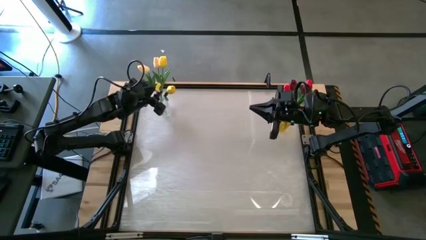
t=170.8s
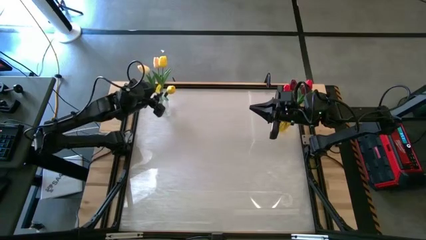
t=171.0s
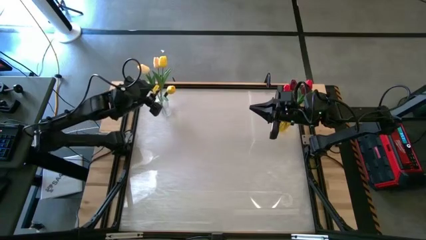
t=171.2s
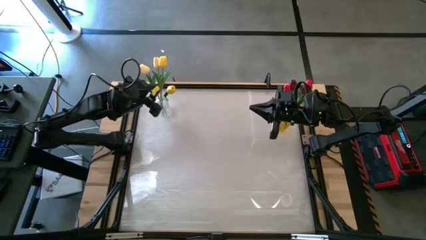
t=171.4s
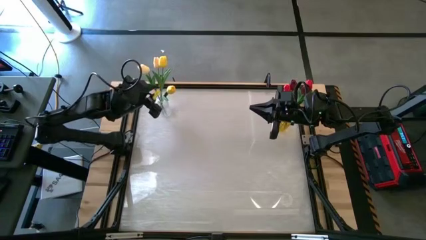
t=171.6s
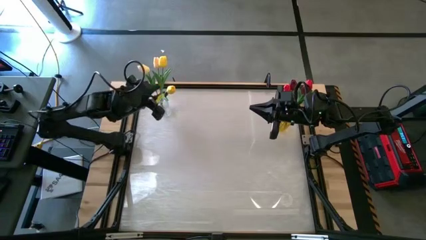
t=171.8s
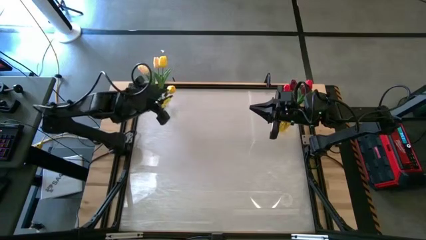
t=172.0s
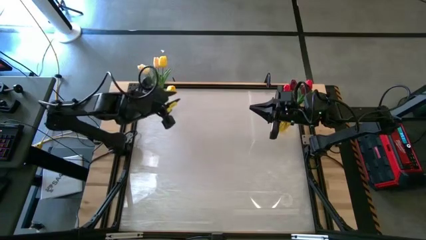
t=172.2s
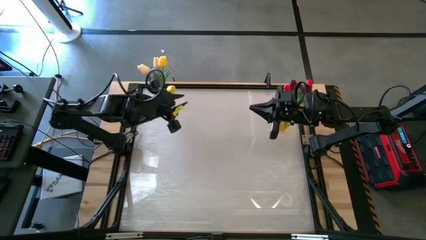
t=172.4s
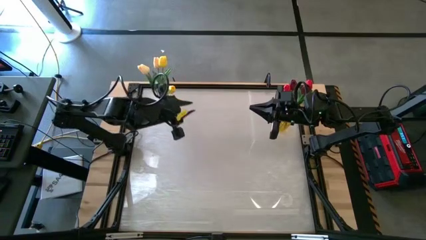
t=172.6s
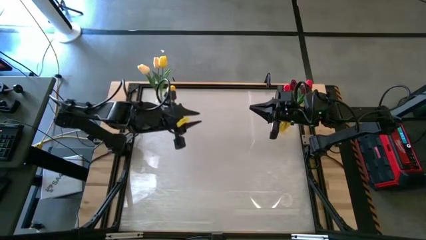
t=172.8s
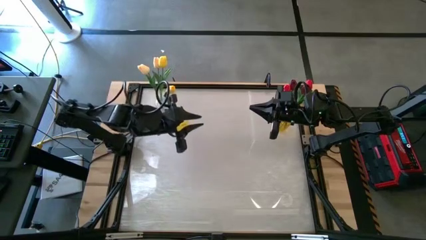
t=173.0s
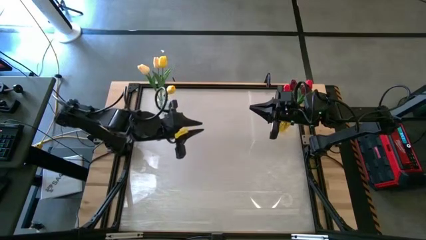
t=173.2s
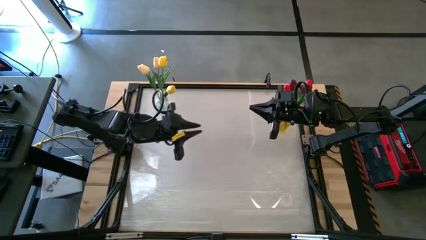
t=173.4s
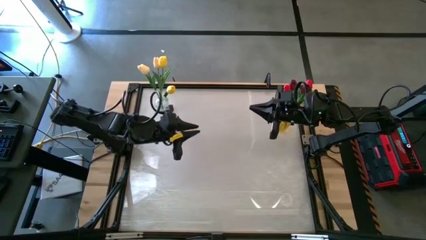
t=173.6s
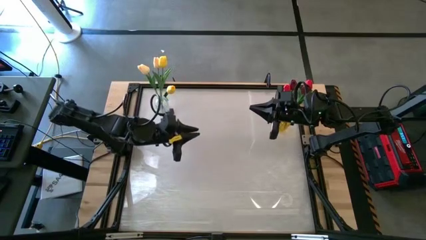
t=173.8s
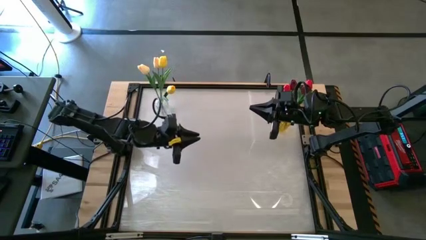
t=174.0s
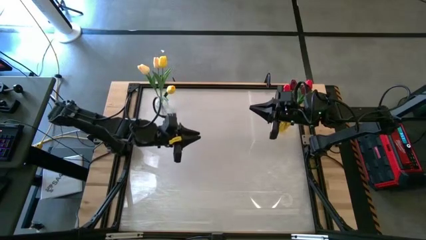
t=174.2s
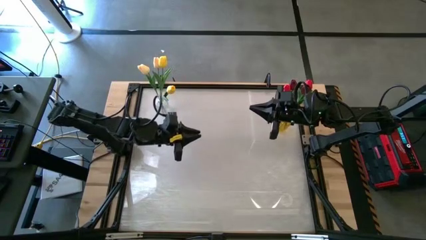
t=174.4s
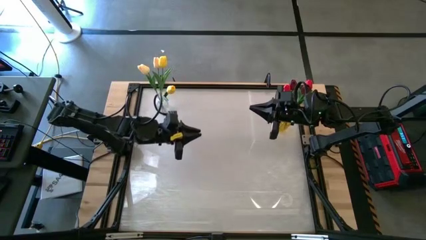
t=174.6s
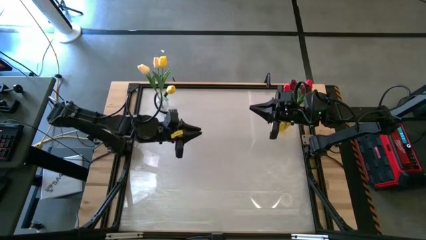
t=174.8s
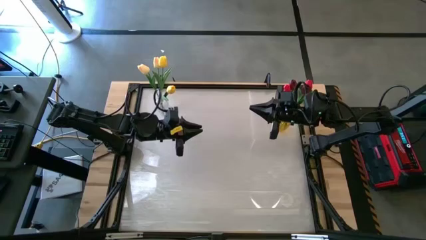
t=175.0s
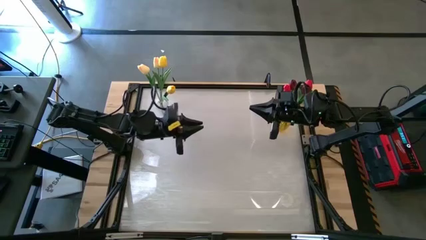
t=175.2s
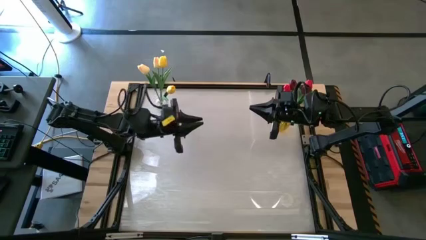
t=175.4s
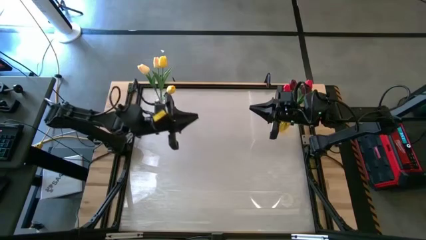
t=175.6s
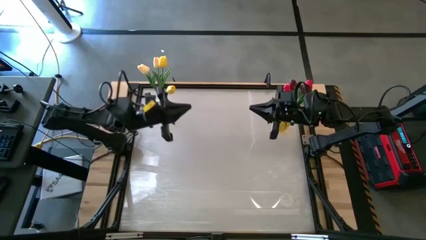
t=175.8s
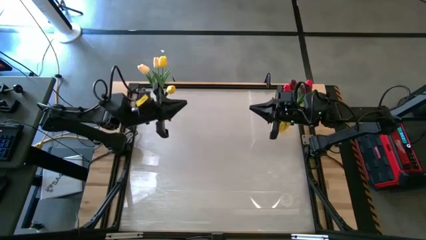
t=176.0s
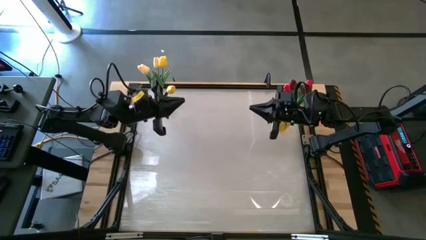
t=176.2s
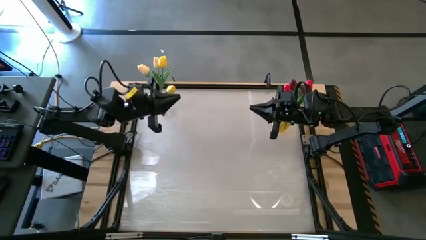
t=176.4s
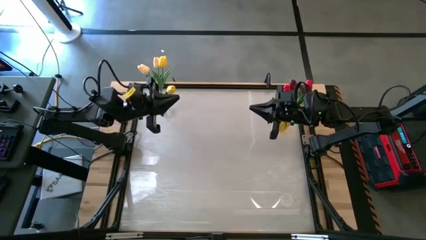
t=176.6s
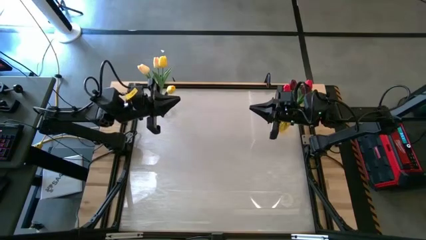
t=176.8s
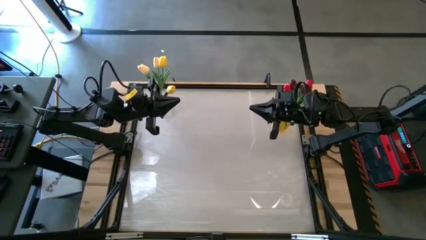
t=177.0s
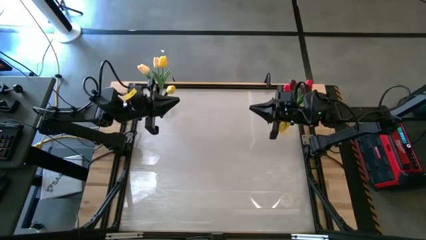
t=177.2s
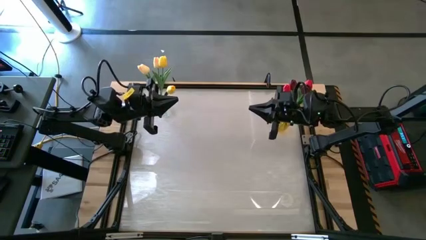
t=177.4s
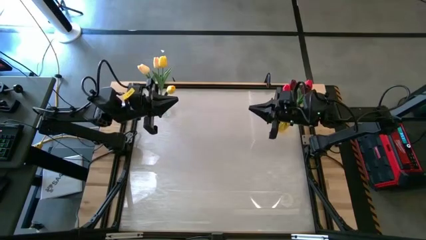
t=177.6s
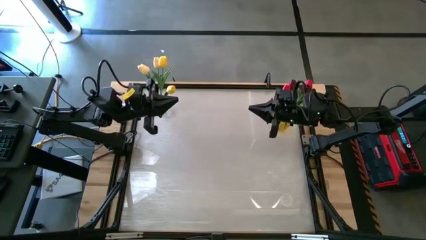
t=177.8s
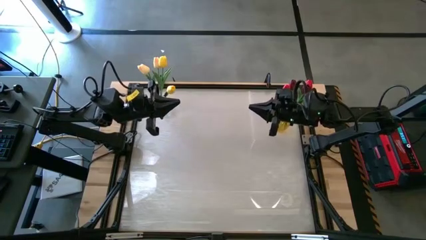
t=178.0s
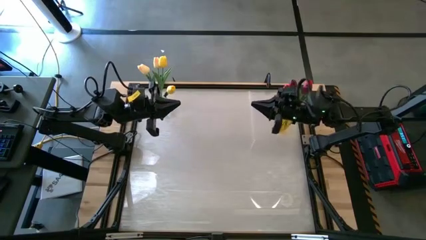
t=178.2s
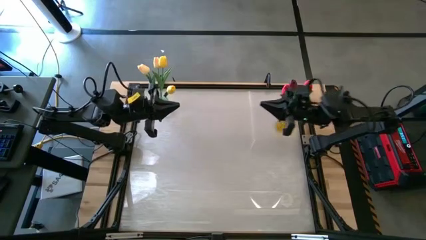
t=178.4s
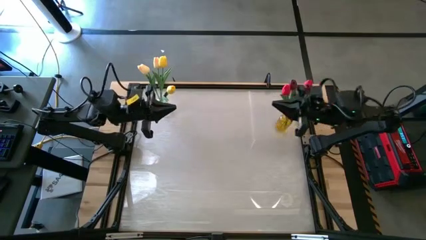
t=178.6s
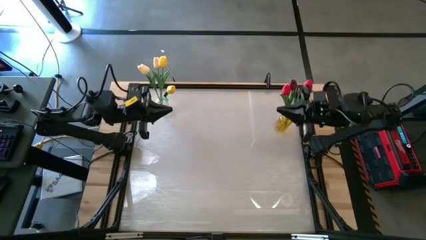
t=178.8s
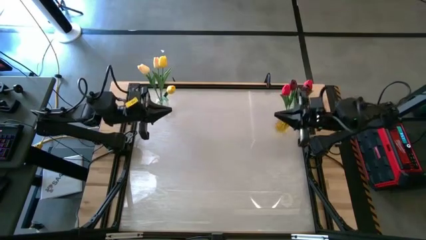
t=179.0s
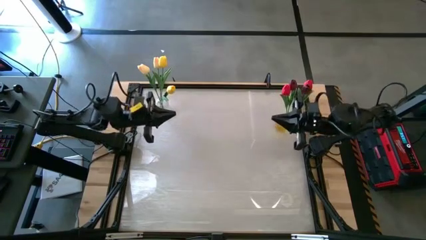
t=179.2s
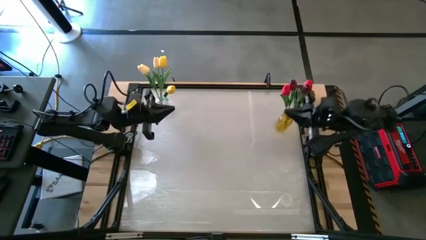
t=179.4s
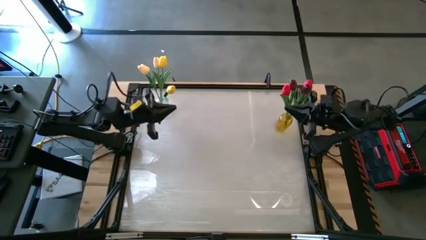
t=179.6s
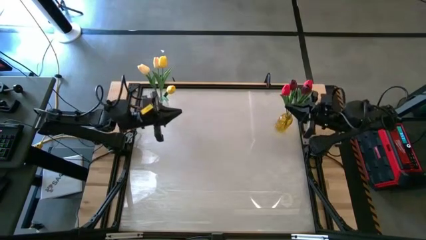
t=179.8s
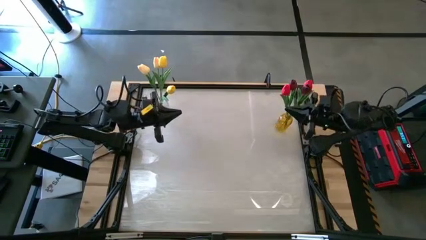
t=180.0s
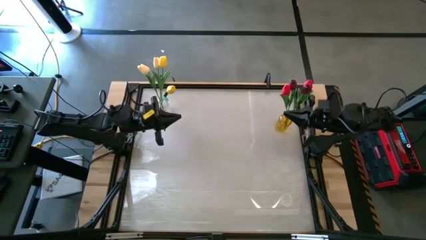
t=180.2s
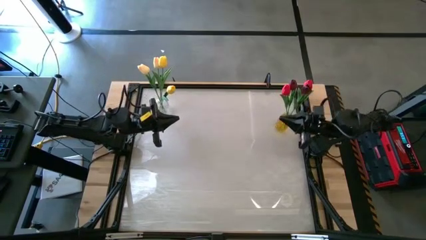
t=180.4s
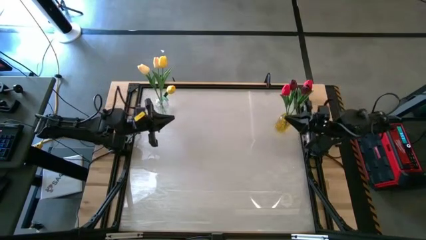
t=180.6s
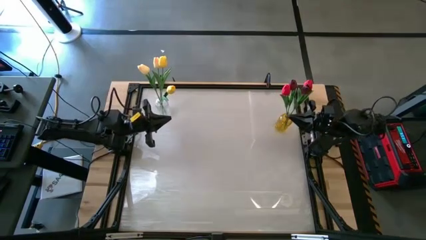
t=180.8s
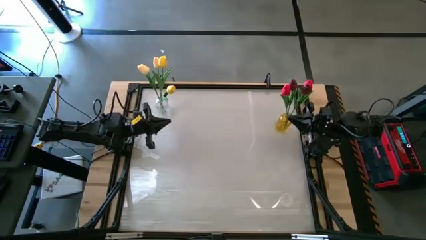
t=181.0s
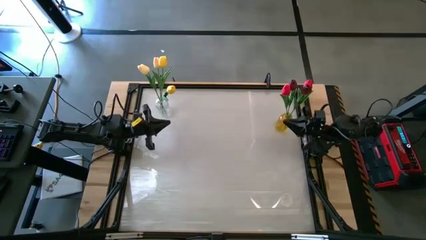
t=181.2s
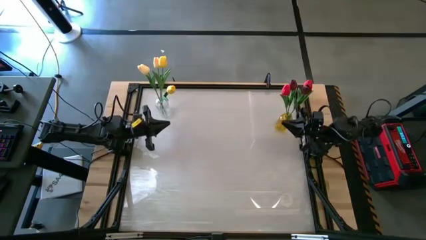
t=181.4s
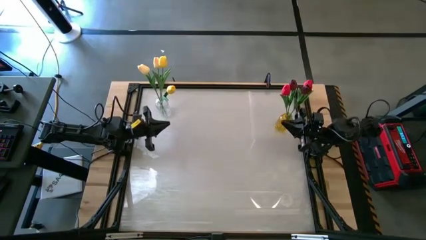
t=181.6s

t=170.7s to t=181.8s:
Task: Sort flowers into vase by color
Return to Home Position

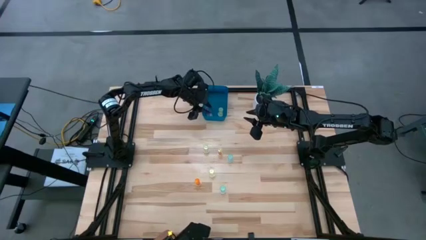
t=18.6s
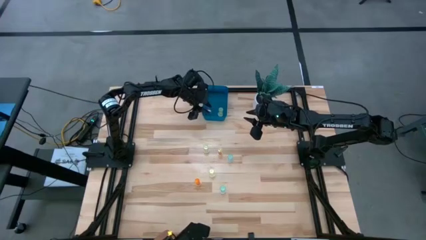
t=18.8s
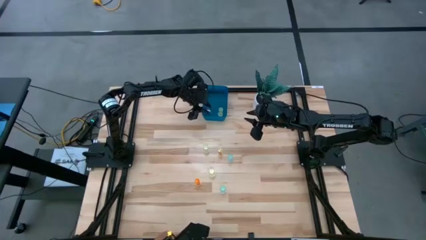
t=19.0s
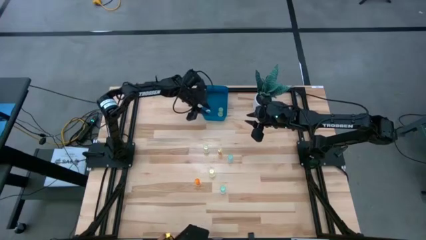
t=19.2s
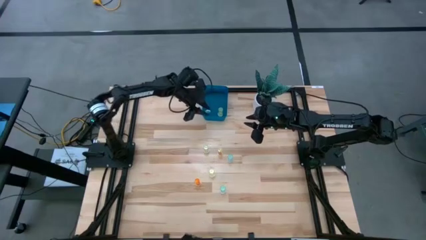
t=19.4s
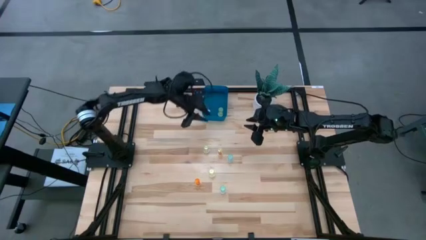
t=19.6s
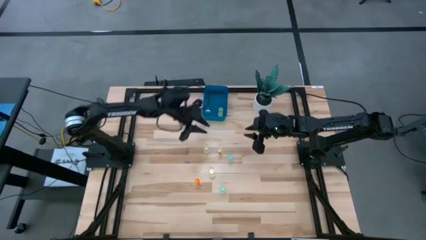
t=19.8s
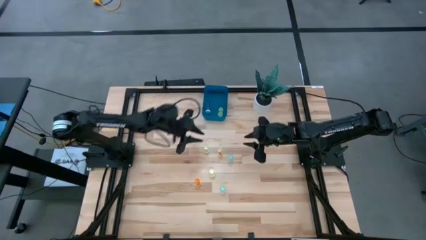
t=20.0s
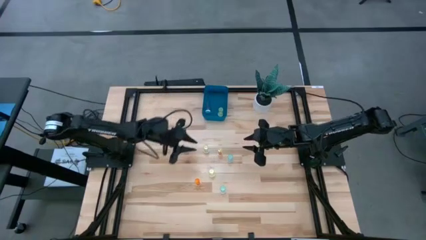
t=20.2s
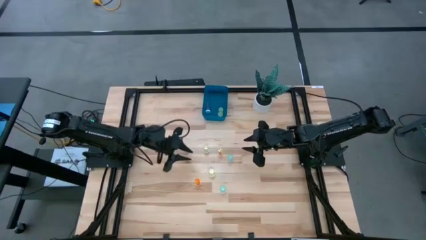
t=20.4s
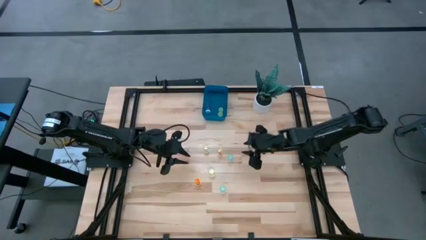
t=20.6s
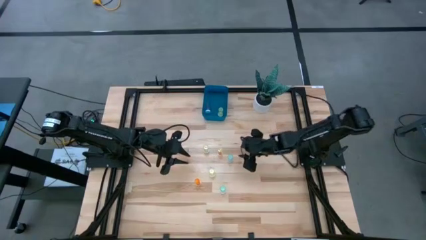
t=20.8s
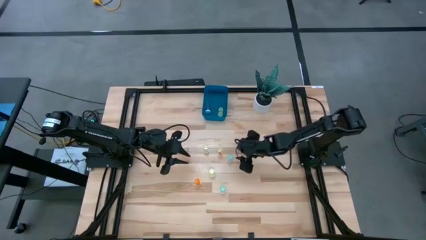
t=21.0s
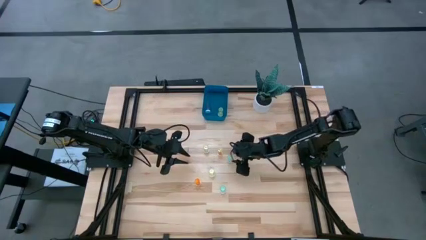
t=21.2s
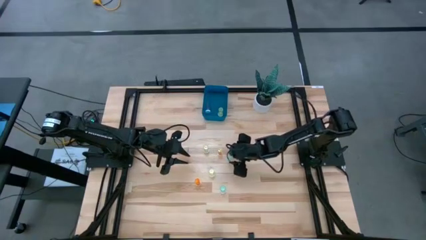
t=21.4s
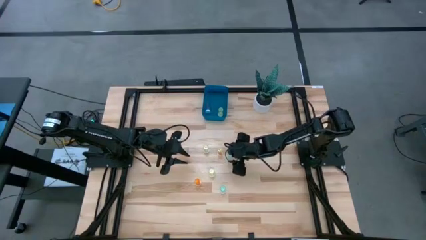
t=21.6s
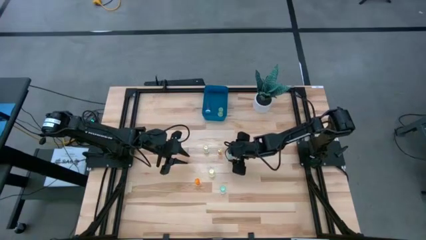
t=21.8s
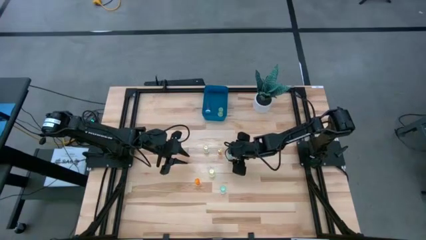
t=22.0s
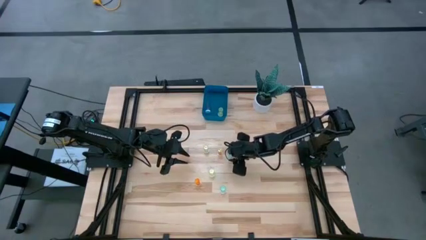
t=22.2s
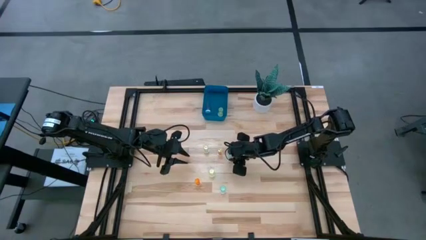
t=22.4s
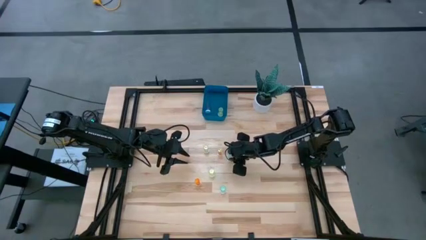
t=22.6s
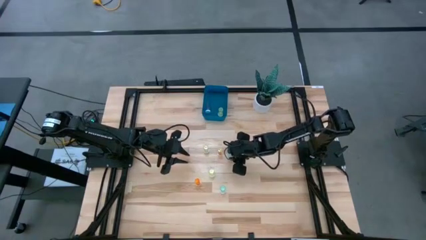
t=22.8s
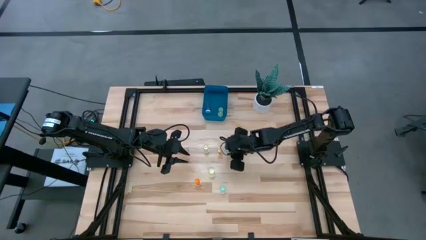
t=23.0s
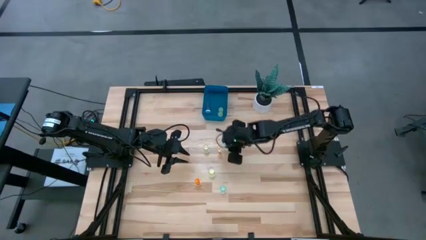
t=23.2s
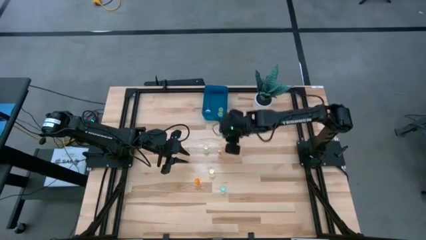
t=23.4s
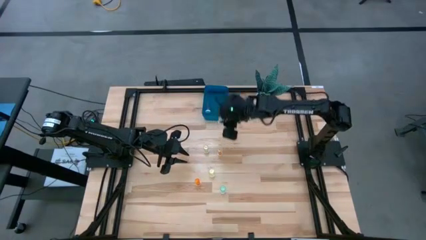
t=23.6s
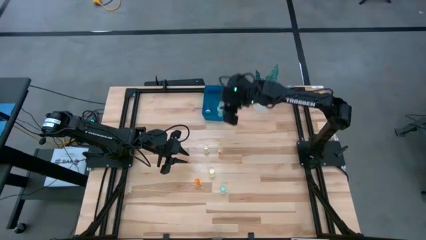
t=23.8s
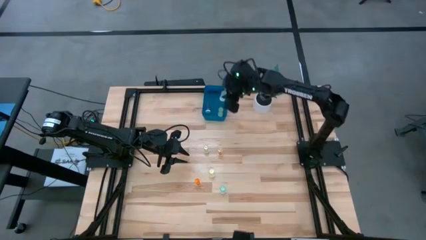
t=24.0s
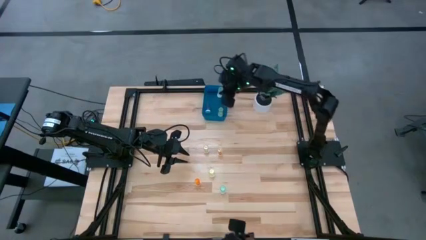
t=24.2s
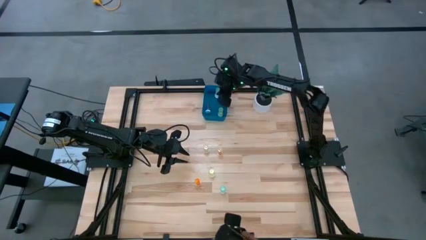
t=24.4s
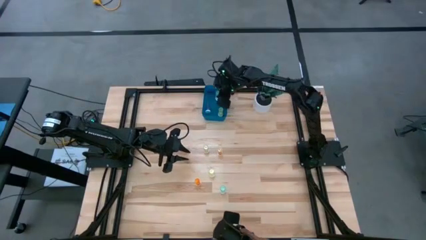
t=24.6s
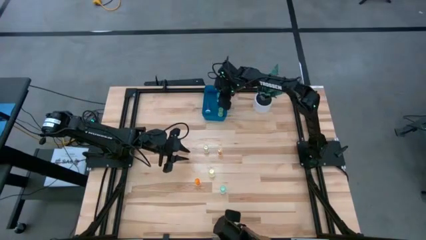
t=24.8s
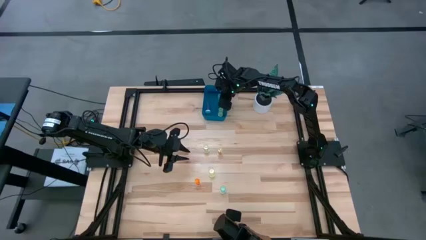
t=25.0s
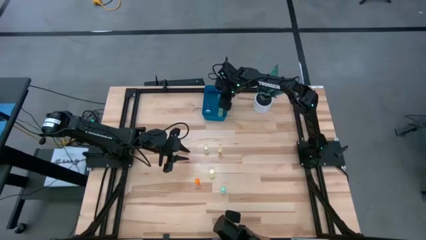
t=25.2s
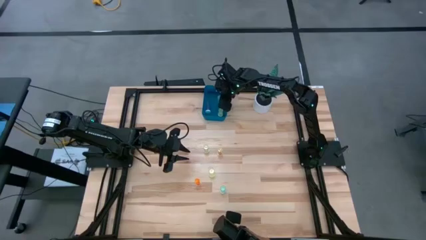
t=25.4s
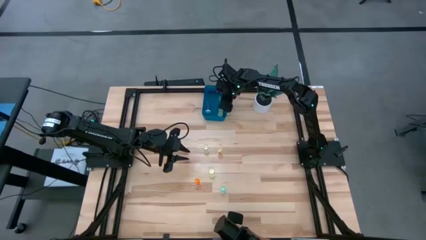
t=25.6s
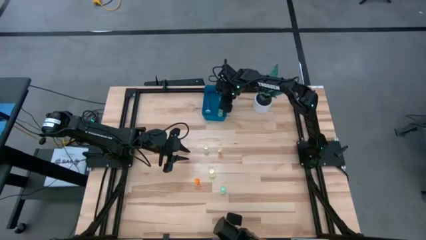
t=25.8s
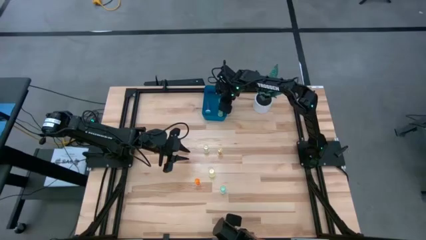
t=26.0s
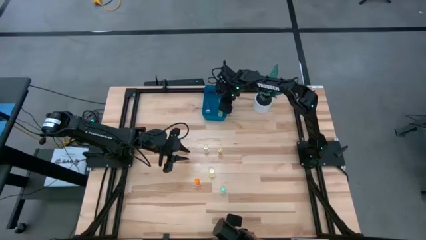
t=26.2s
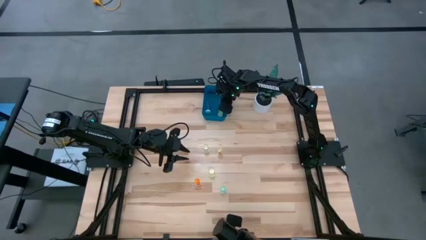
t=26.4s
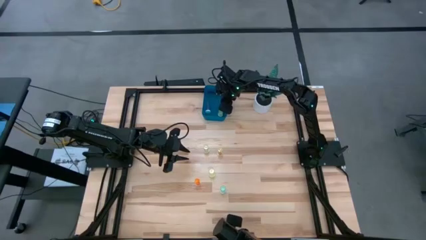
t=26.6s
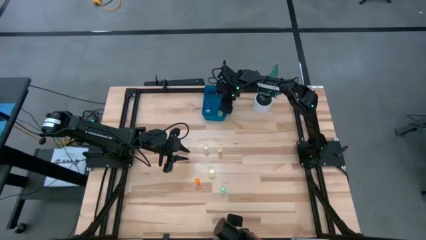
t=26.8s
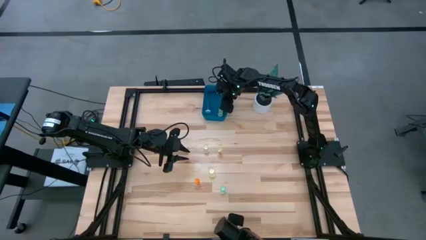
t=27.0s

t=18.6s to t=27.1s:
Task: Pick and place pill bottles into a basket
Put the top green pill bottle into the blue container
